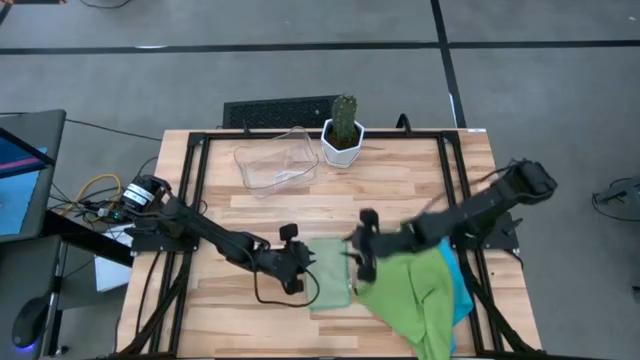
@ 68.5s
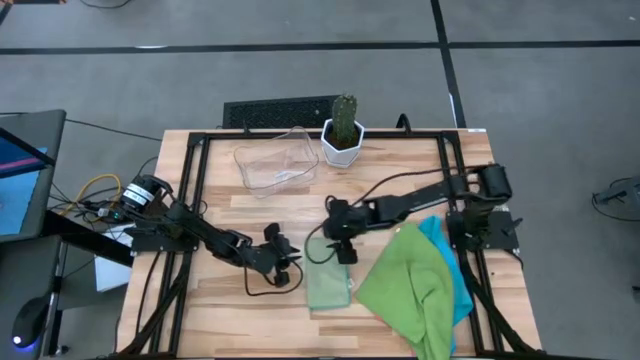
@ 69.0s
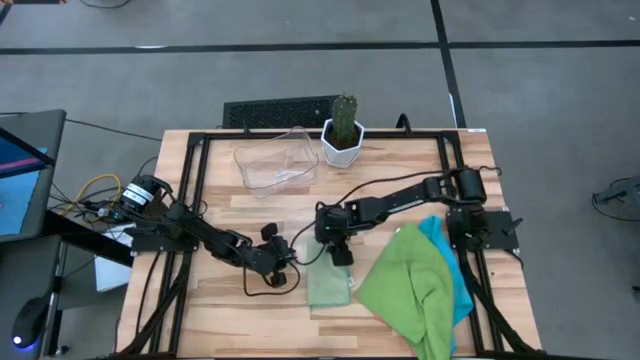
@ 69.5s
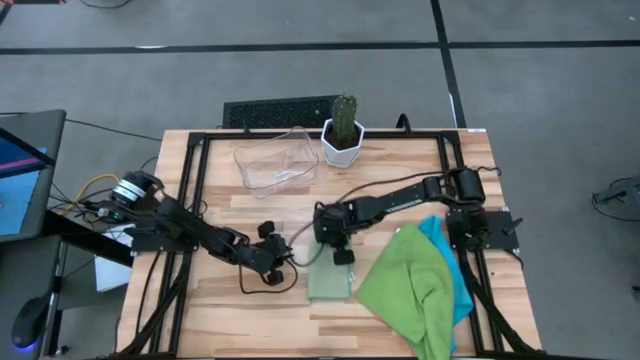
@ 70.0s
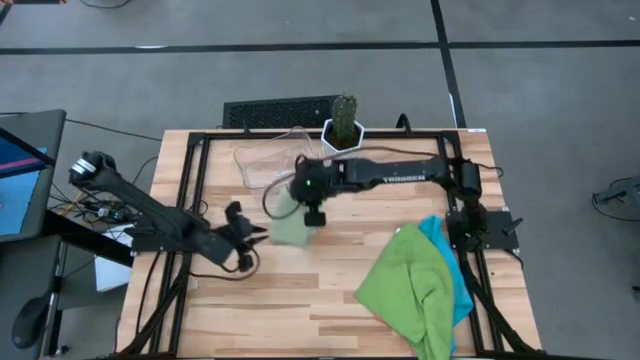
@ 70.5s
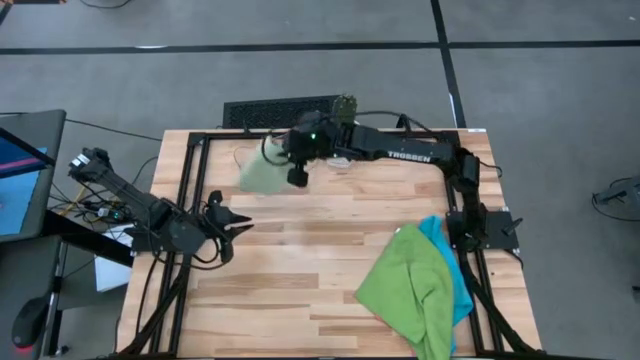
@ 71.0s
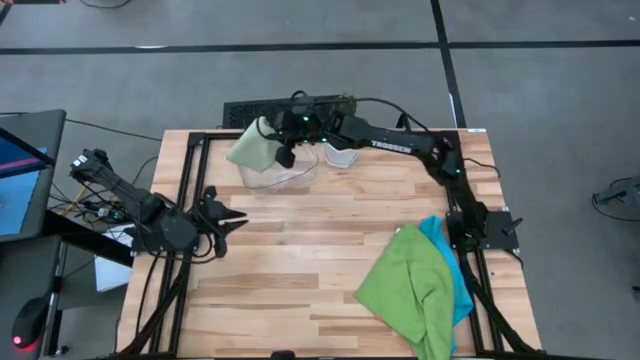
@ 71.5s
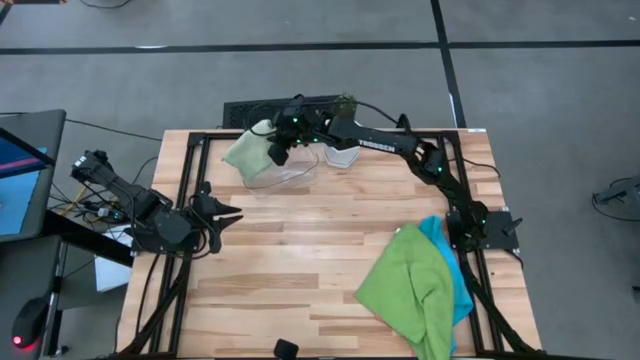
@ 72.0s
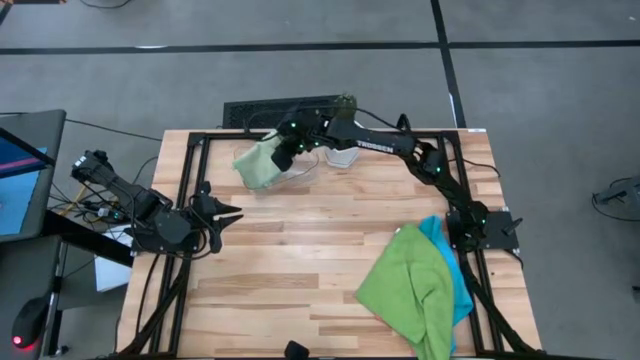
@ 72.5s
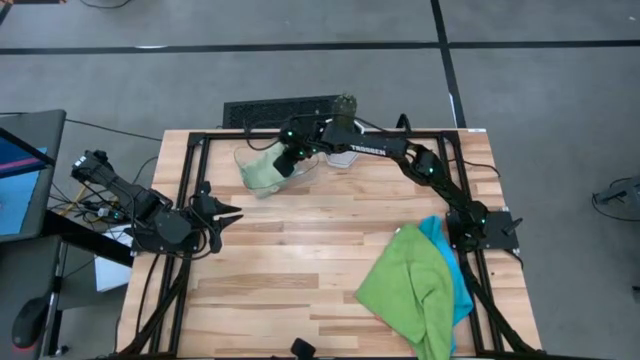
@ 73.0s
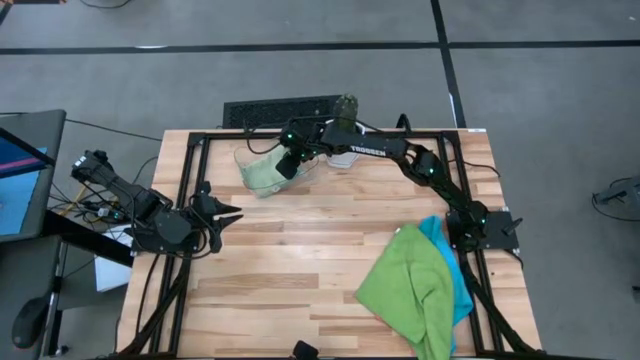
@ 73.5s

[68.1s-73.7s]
Task: Fold microfiber towels
Put the light green microfiber towel into the transparent bin

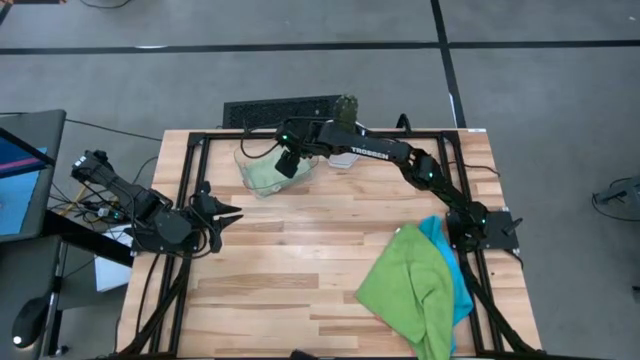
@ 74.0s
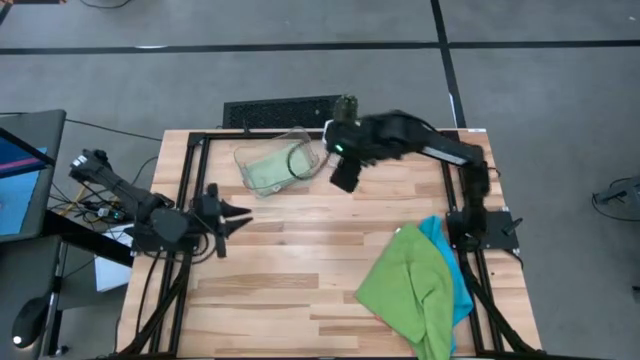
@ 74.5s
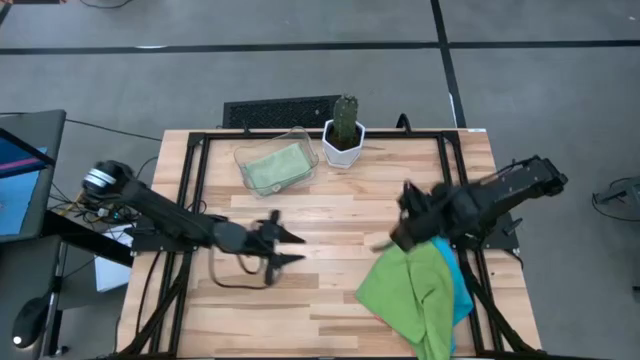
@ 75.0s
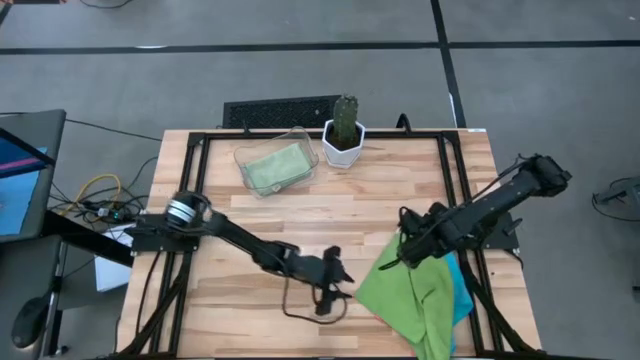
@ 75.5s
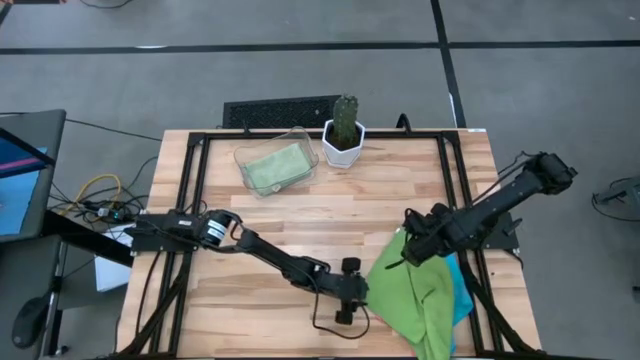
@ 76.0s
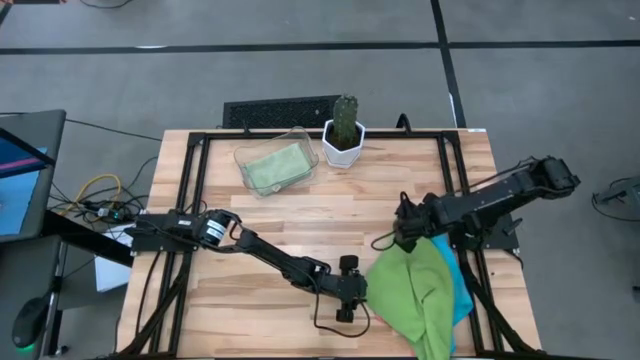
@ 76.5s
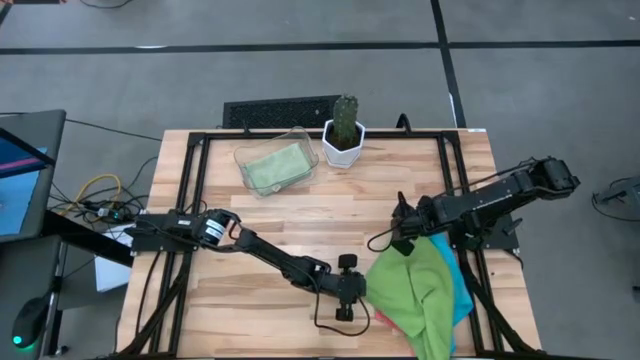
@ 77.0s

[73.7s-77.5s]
Fold the green microfiber towel

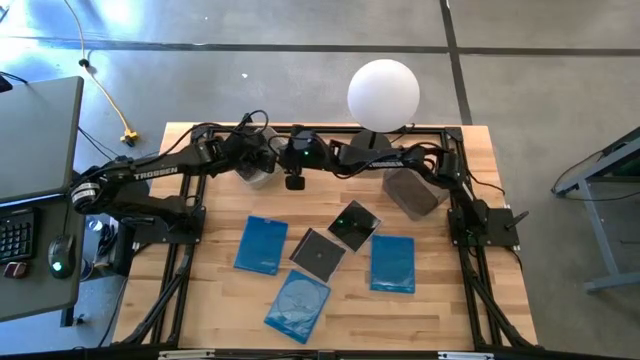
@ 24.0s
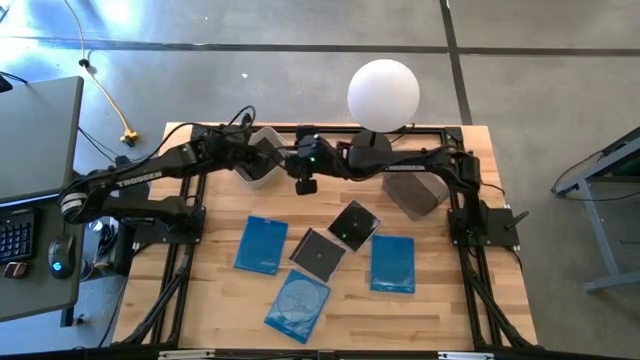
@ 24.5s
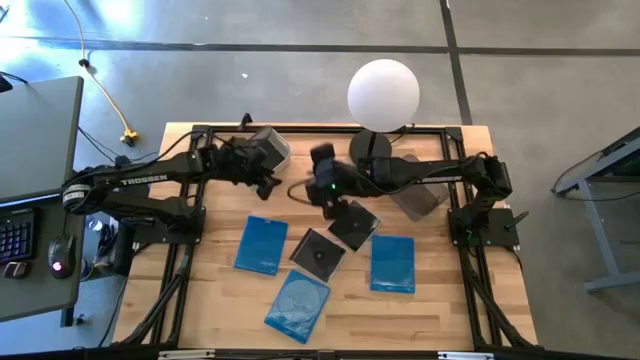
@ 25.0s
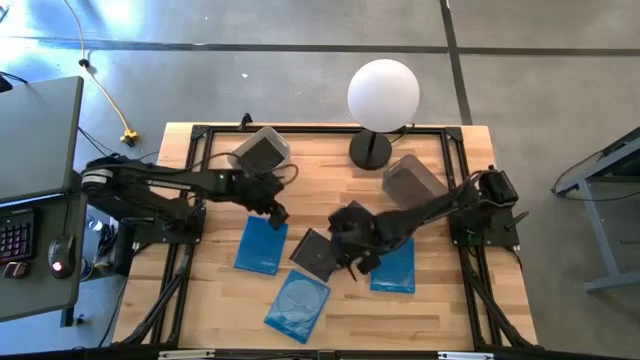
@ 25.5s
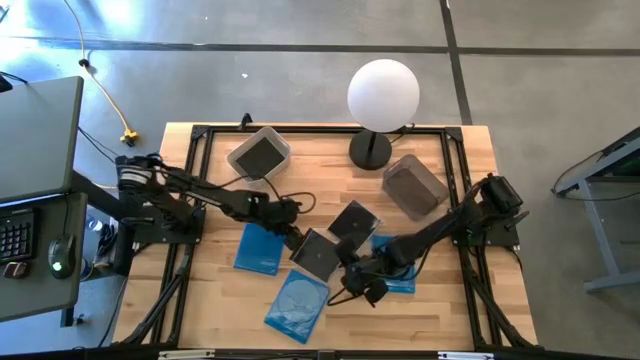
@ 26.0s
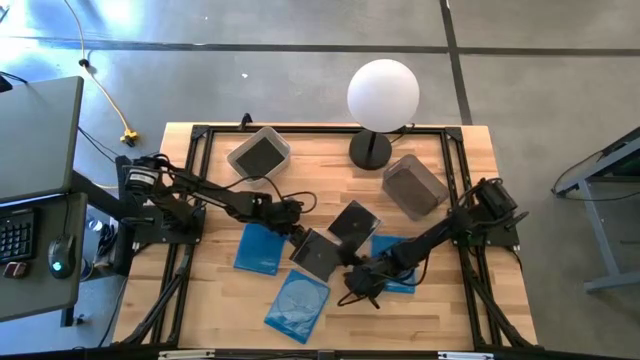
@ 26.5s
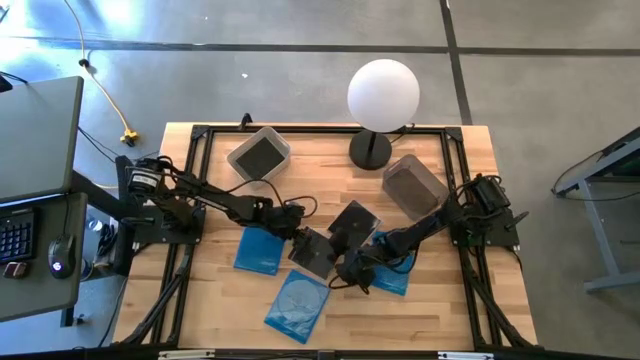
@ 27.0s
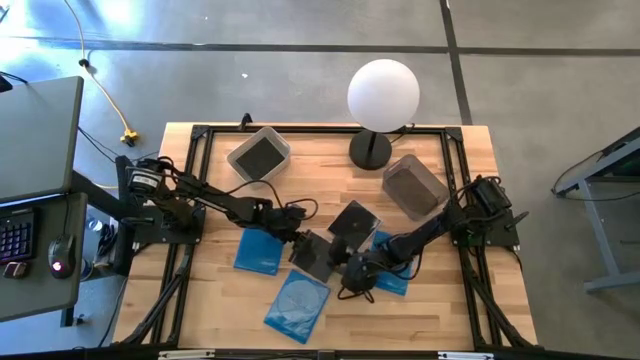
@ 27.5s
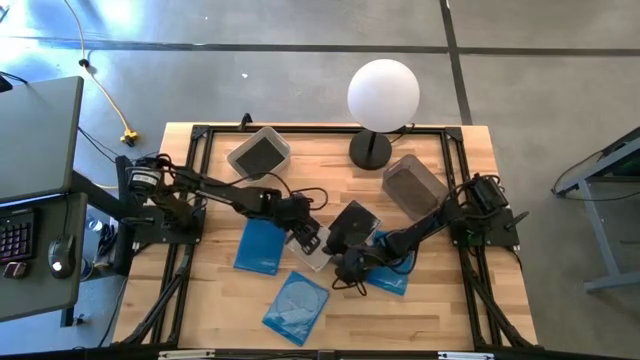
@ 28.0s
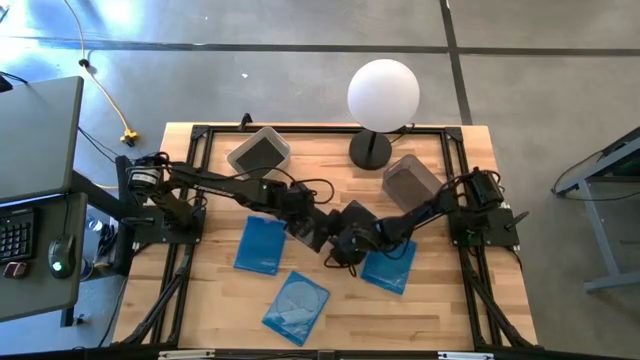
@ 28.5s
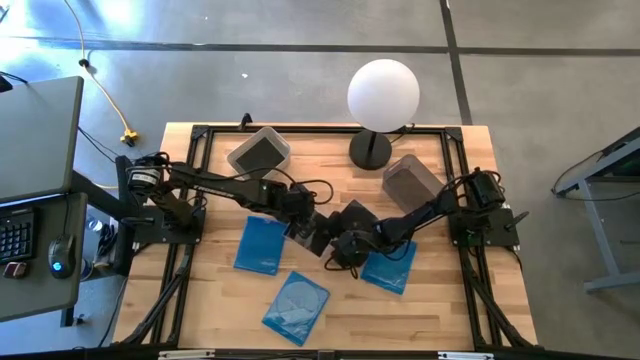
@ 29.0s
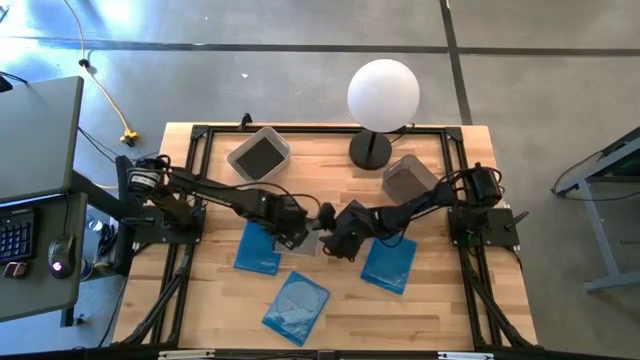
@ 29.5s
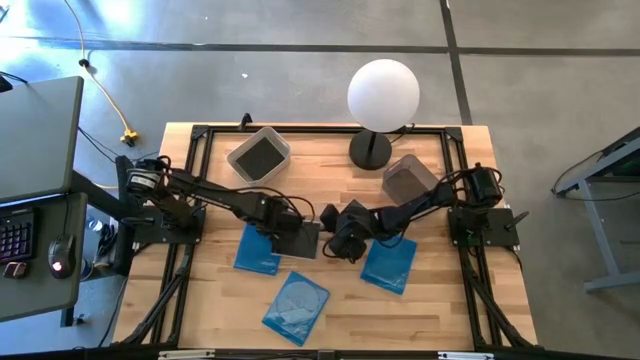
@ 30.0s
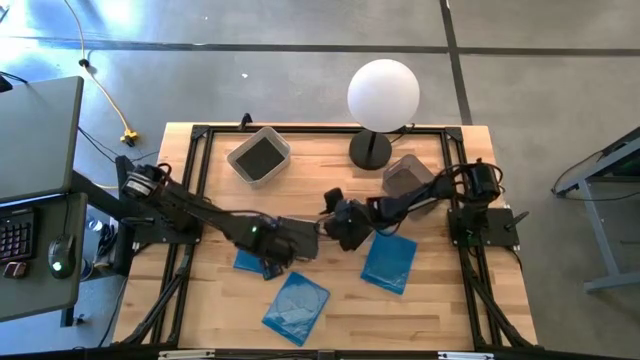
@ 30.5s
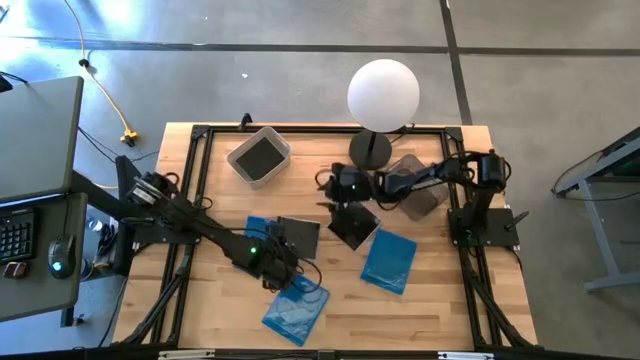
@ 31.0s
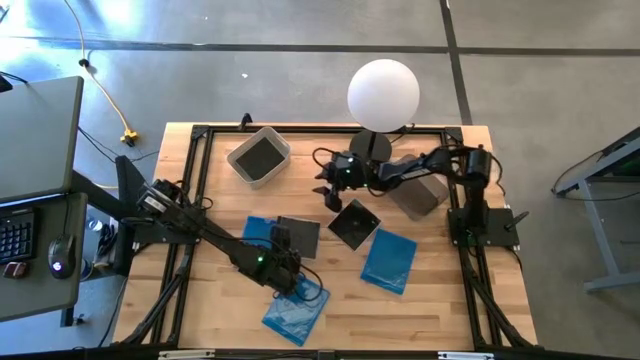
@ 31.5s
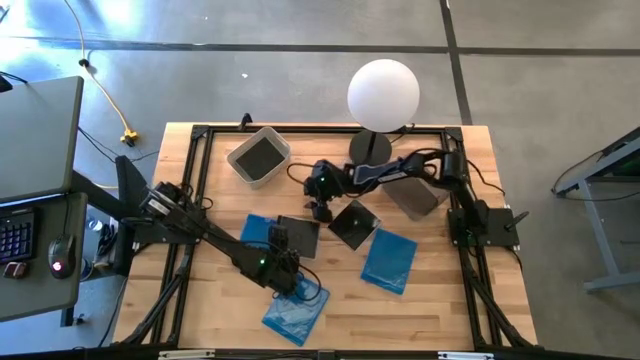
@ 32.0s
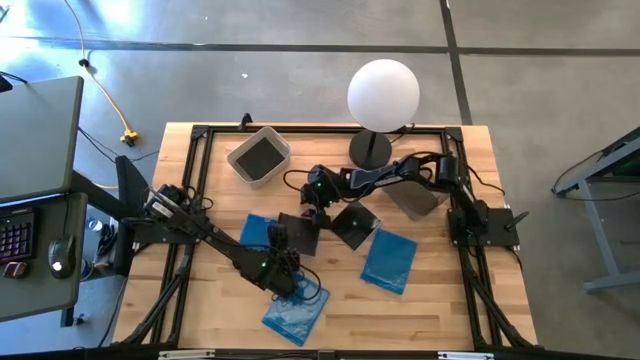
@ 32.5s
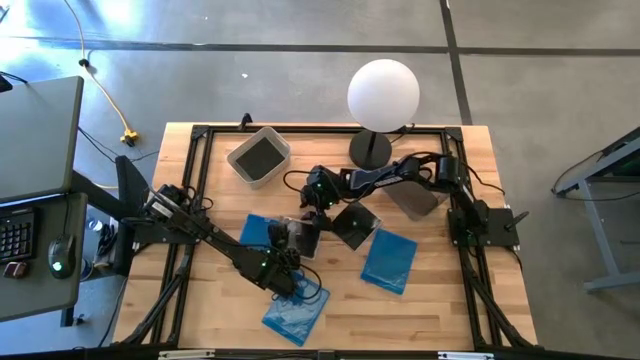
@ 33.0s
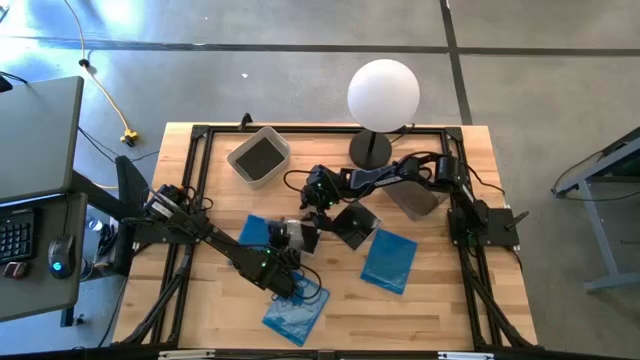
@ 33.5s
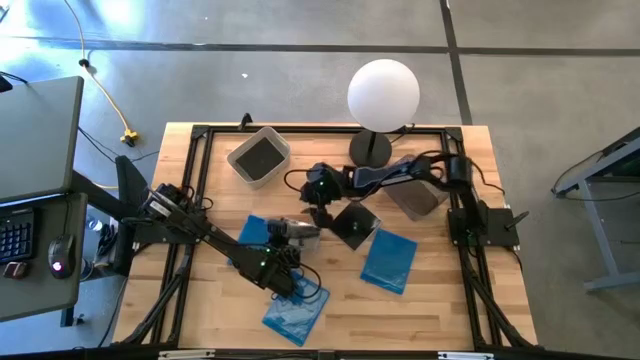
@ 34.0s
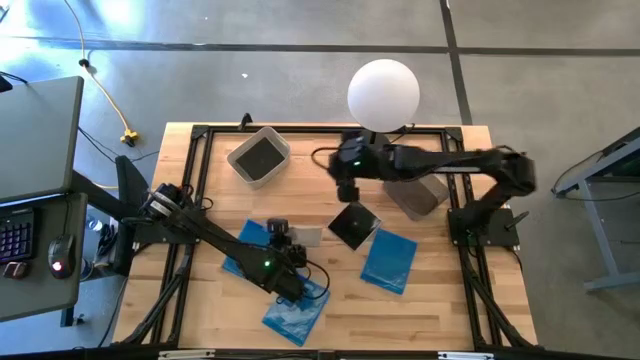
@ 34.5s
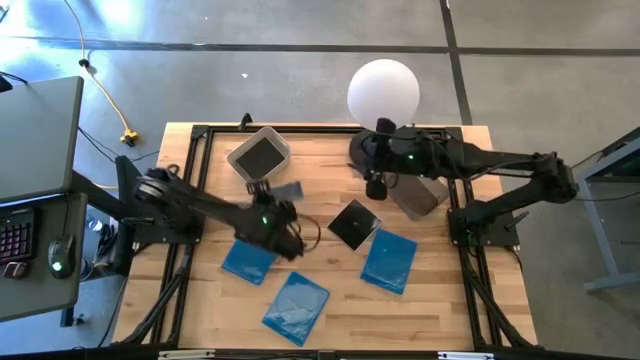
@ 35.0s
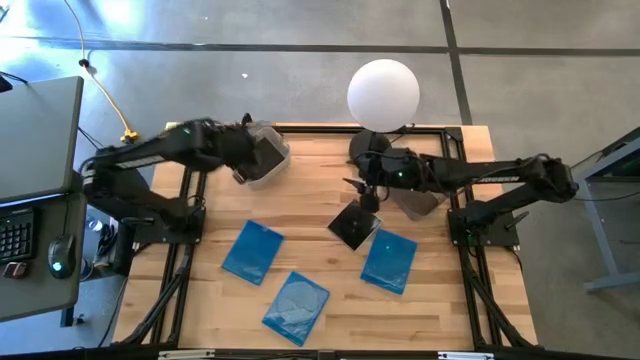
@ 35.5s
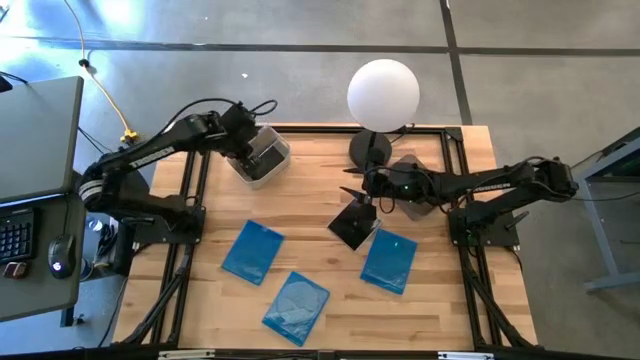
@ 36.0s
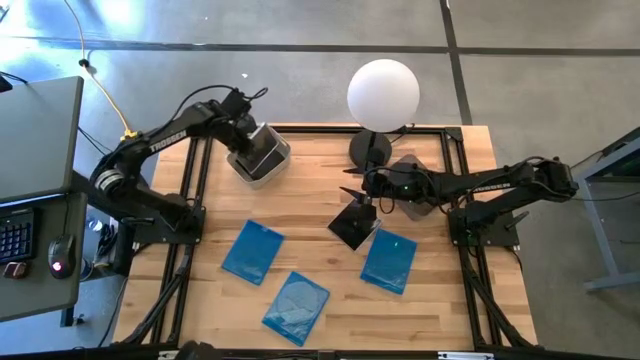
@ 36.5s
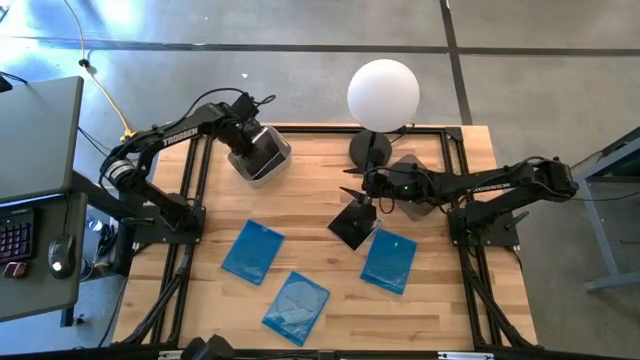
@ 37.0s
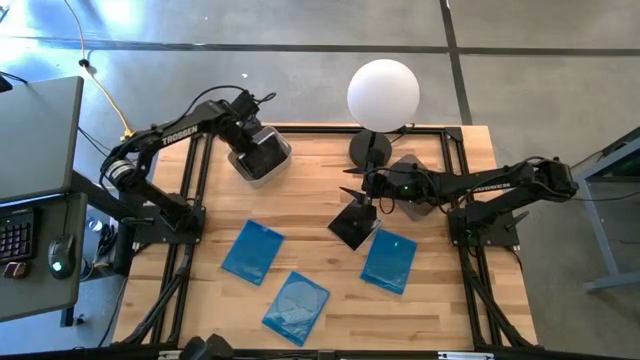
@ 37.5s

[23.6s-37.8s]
Task: Pick & place jewel cases by type
Put the left black CD case into the white bin
